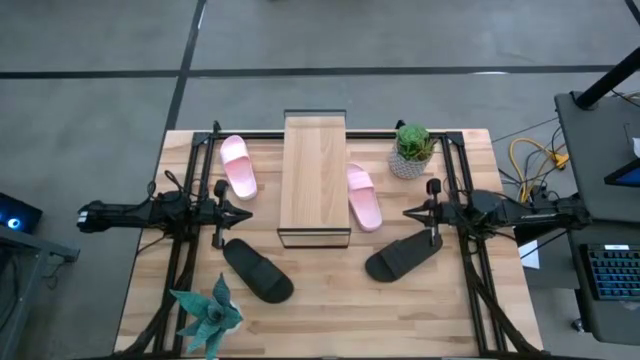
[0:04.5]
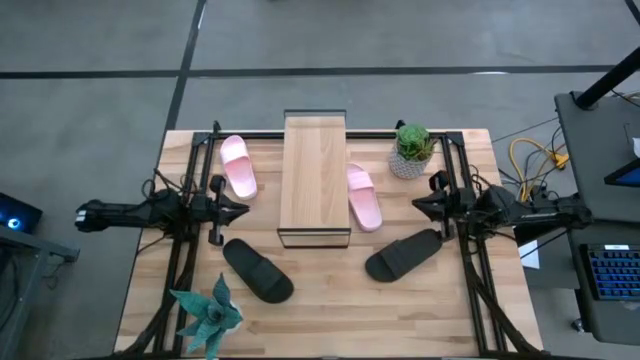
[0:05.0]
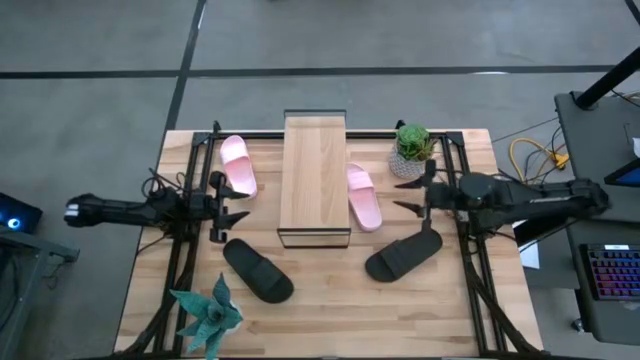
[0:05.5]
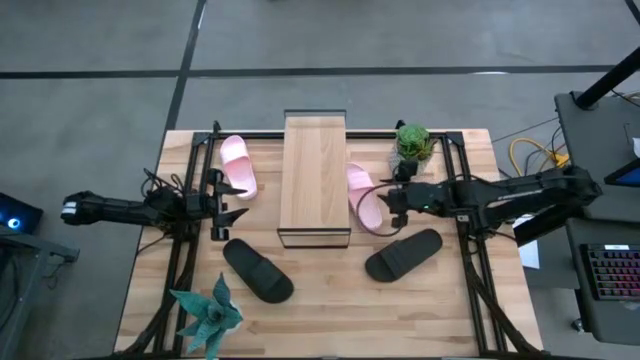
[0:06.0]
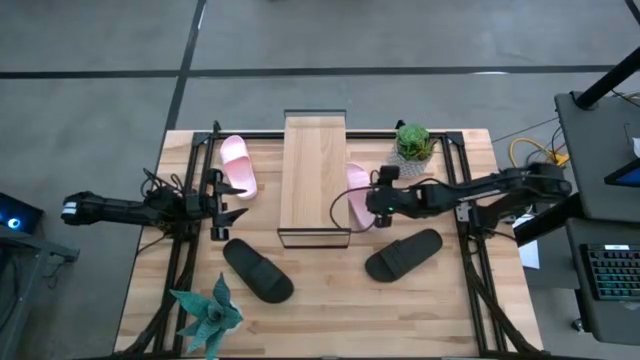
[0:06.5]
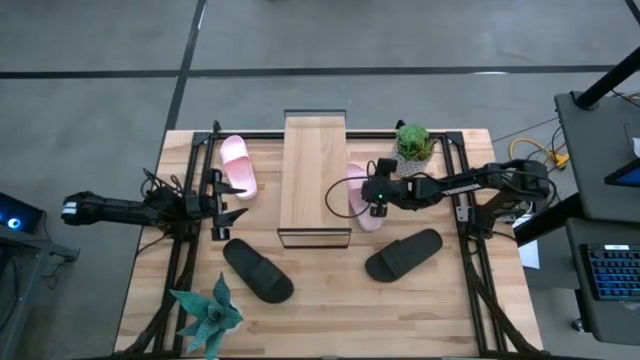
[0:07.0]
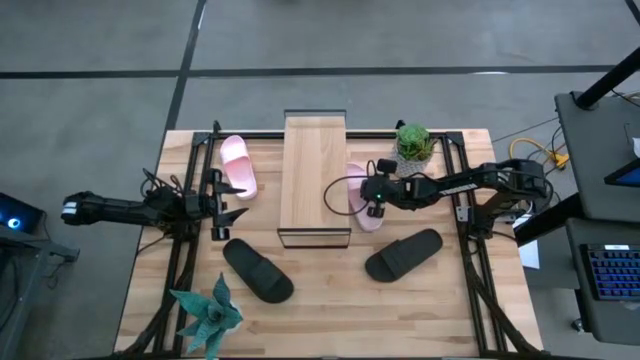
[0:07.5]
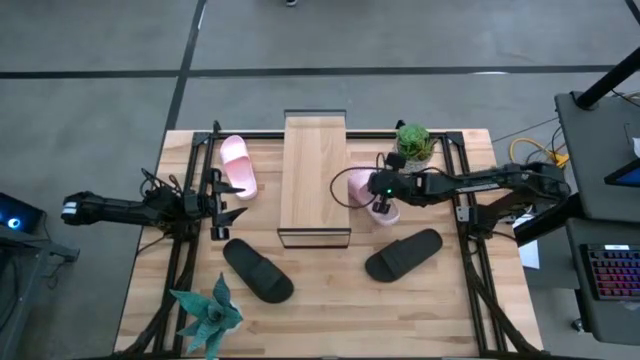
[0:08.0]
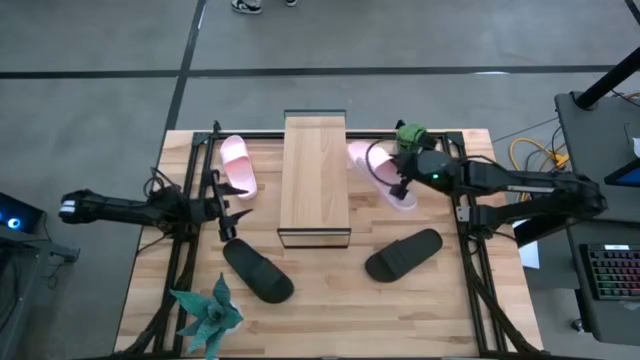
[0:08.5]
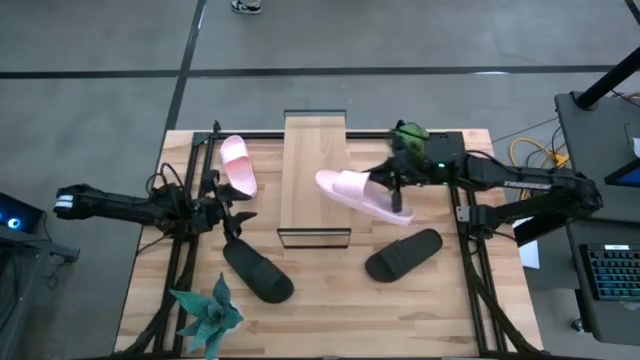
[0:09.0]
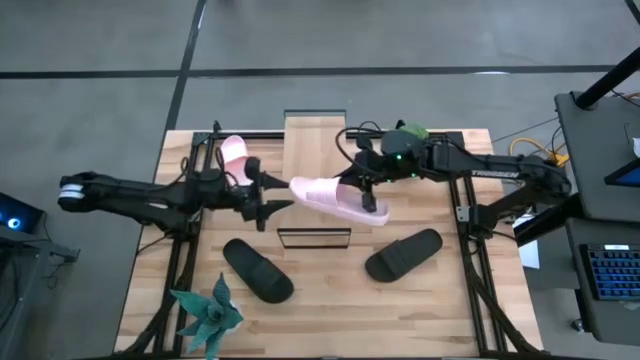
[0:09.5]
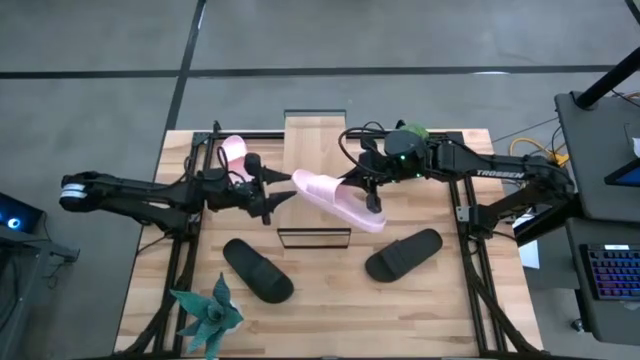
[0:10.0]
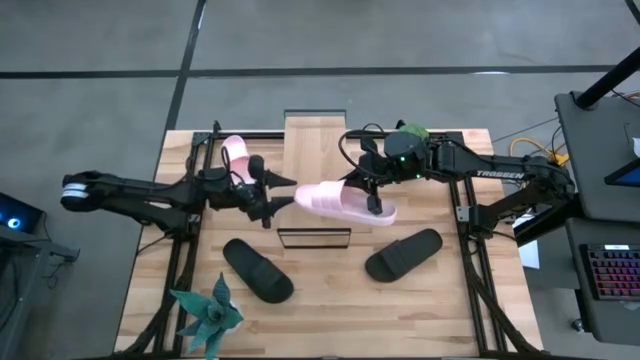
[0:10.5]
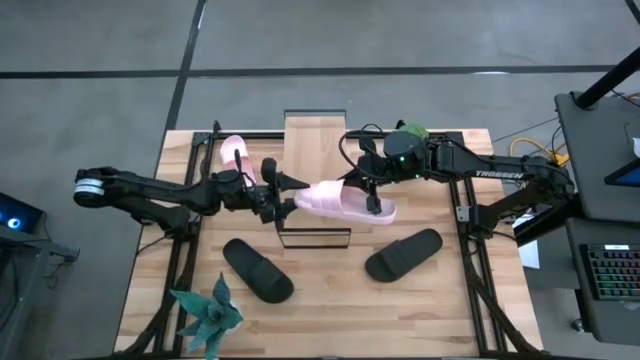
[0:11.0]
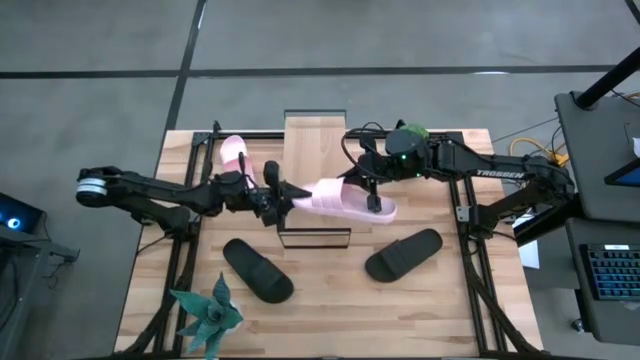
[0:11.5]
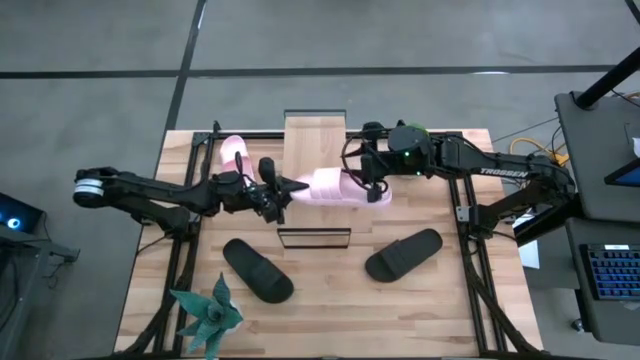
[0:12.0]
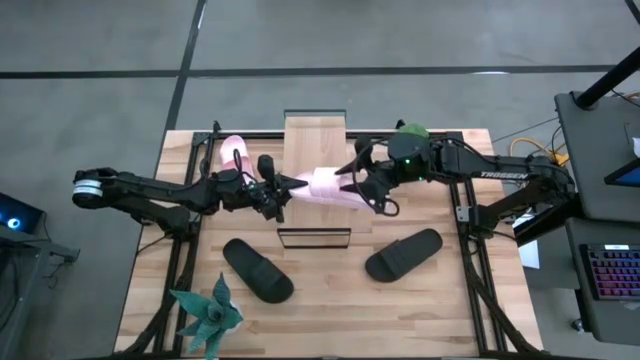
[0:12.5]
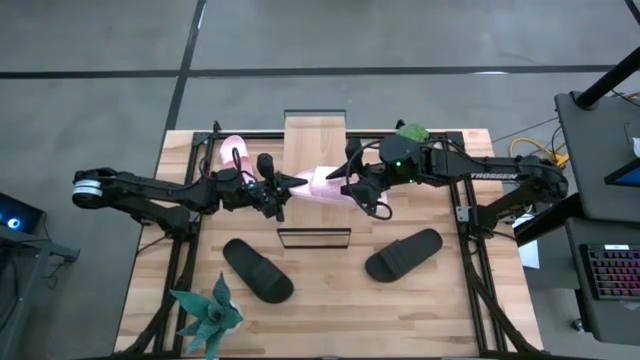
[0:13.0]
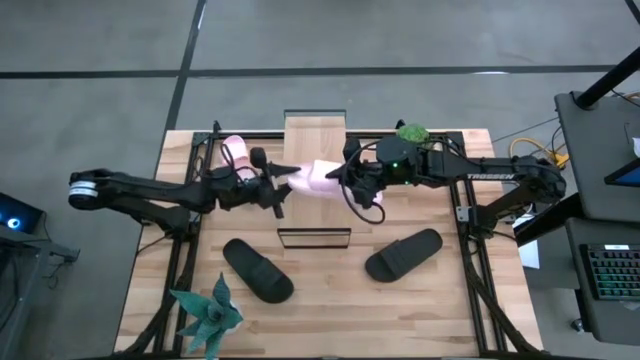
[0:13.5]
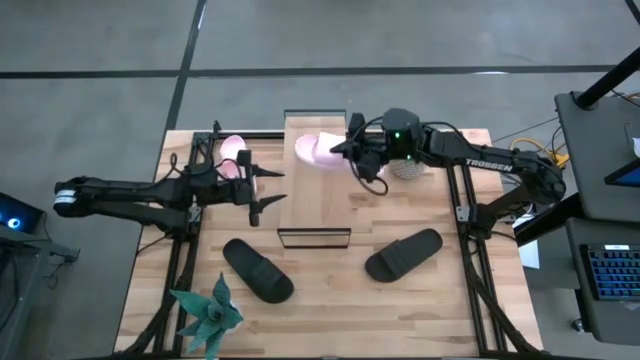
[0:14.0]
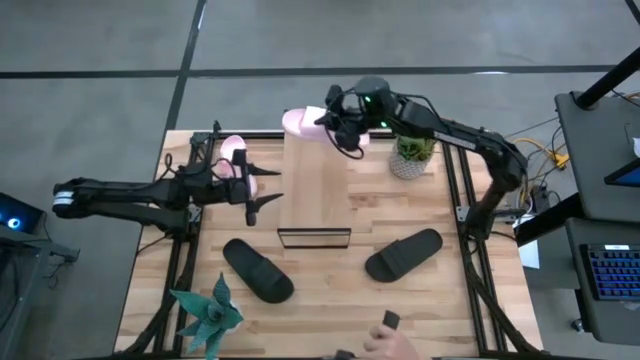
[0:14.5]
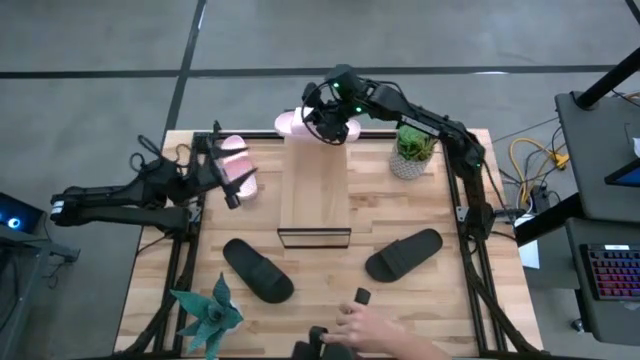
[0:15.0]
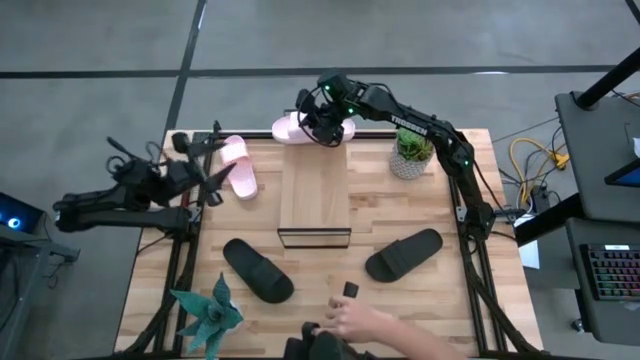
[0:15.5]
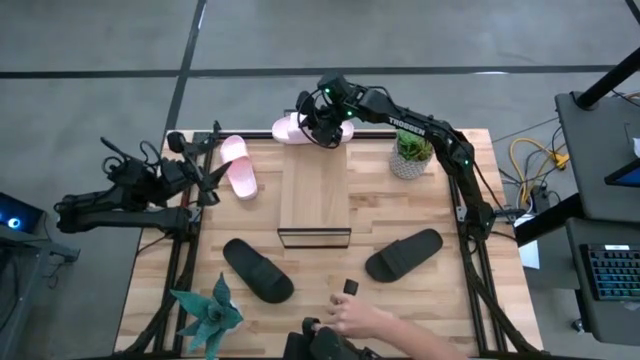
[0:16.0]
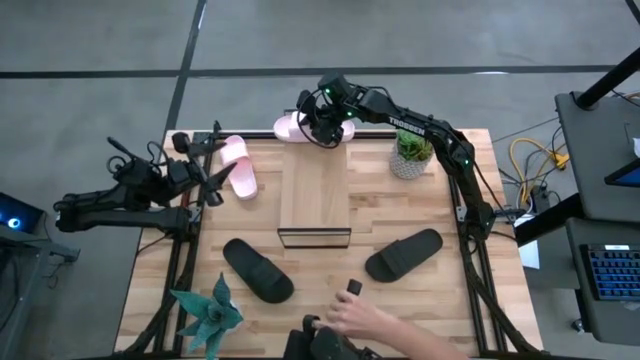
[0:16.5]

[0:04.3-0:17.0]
Task: Pick and place slides into the shelf
Put the right pink slide on the shelf

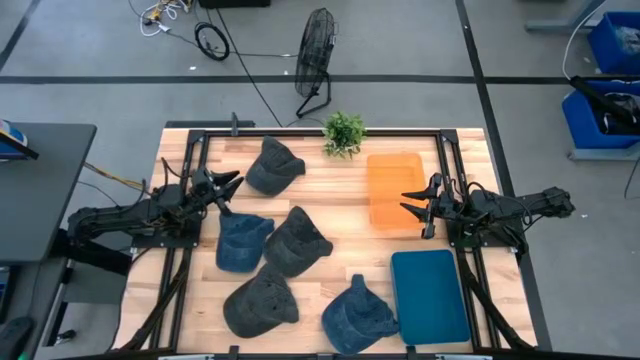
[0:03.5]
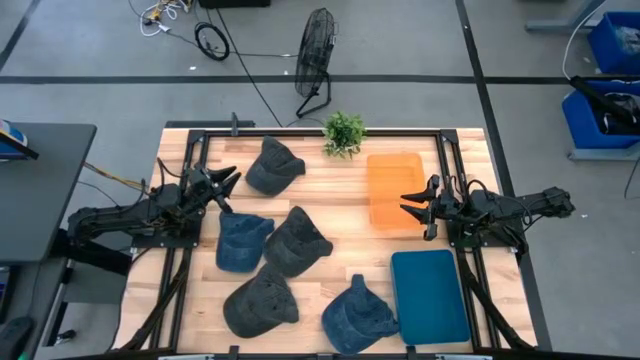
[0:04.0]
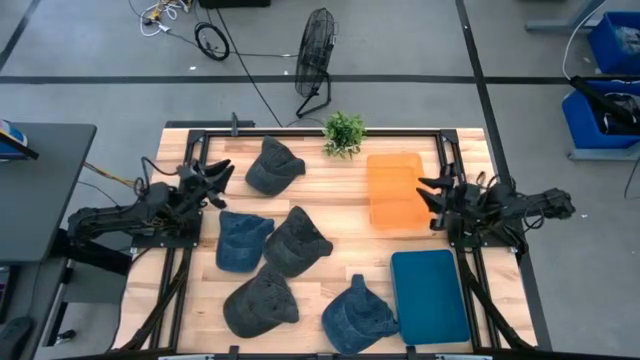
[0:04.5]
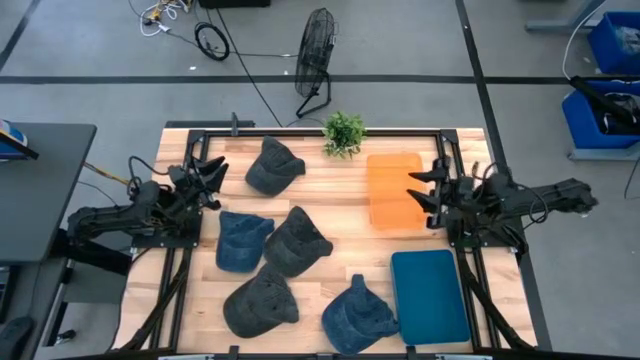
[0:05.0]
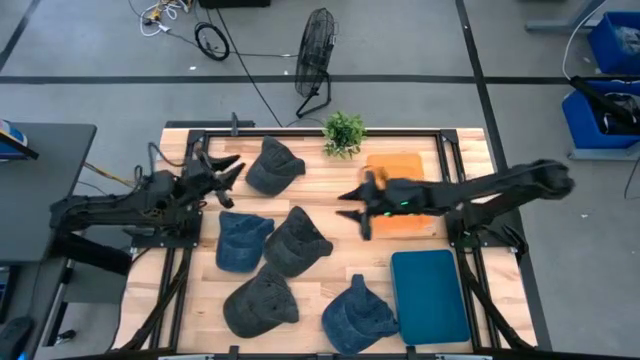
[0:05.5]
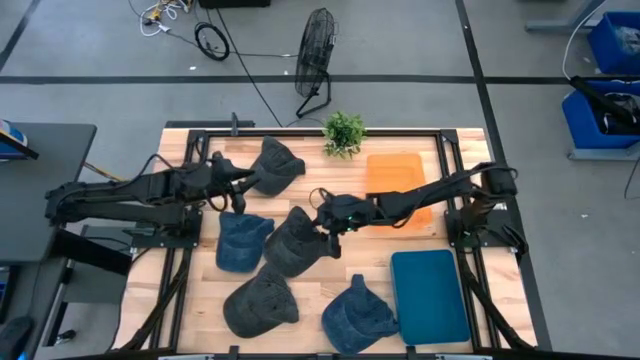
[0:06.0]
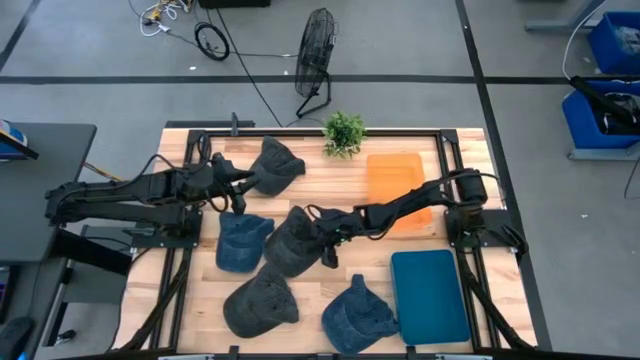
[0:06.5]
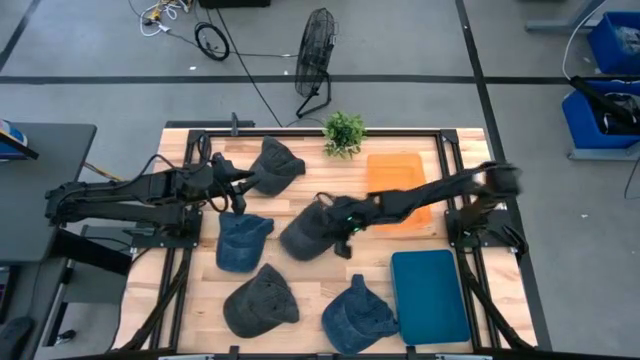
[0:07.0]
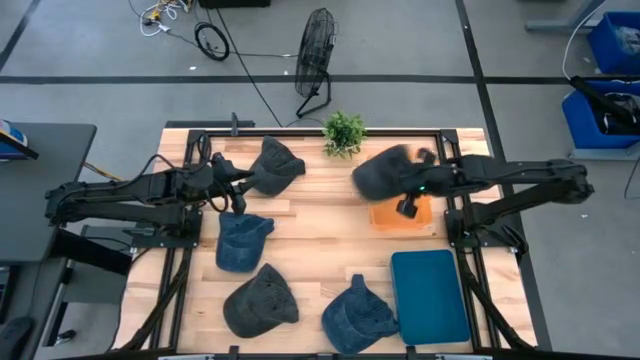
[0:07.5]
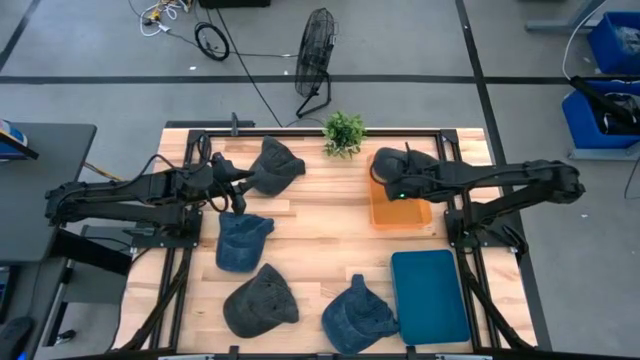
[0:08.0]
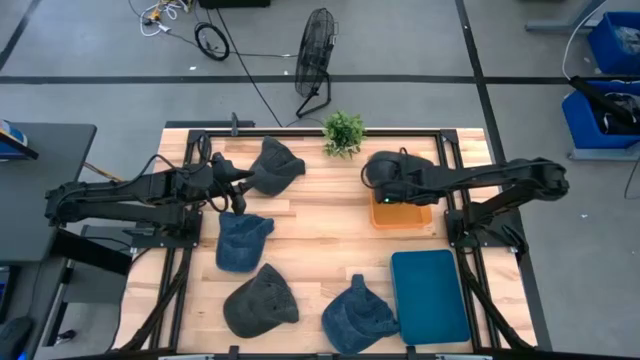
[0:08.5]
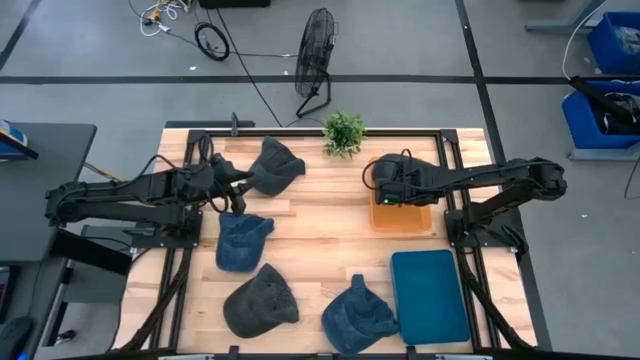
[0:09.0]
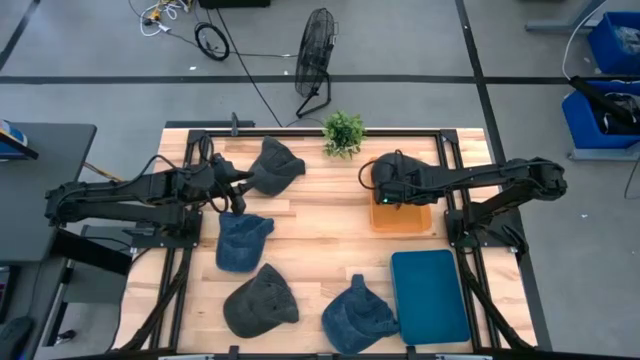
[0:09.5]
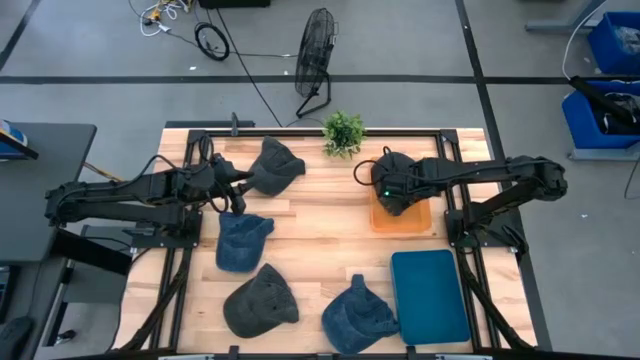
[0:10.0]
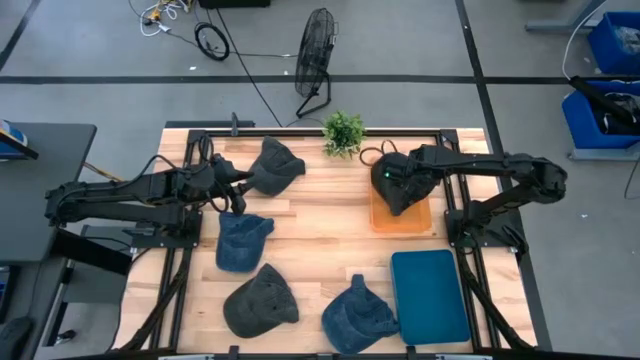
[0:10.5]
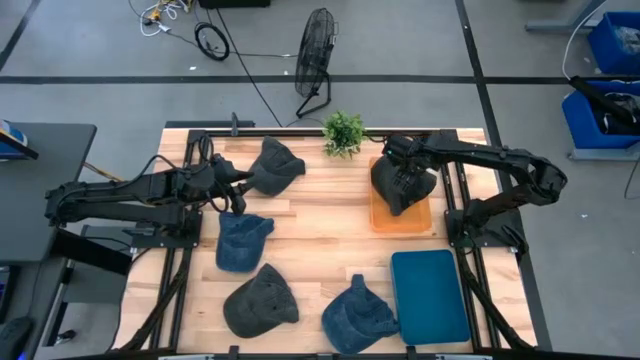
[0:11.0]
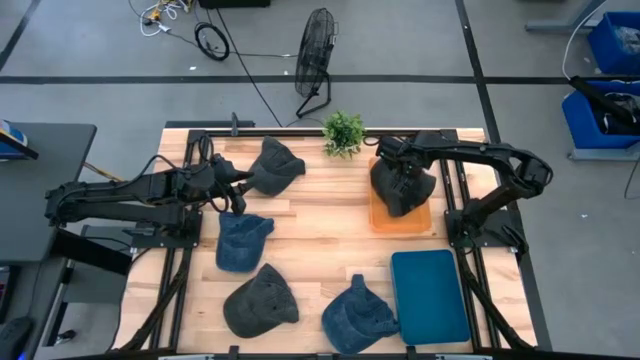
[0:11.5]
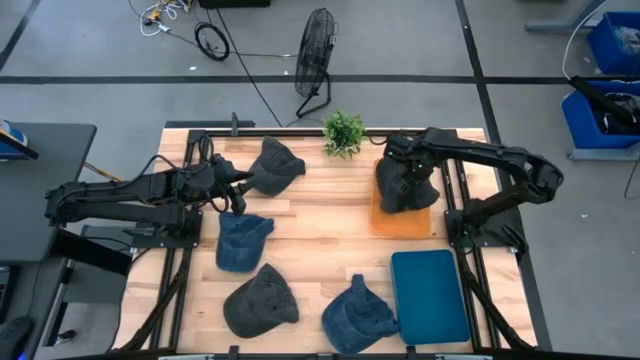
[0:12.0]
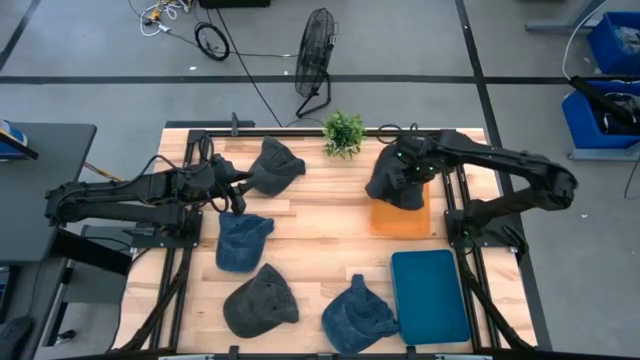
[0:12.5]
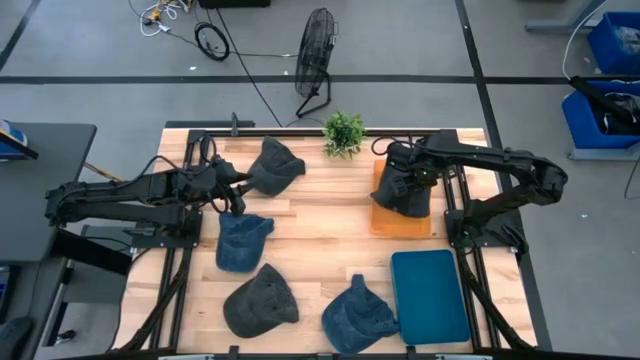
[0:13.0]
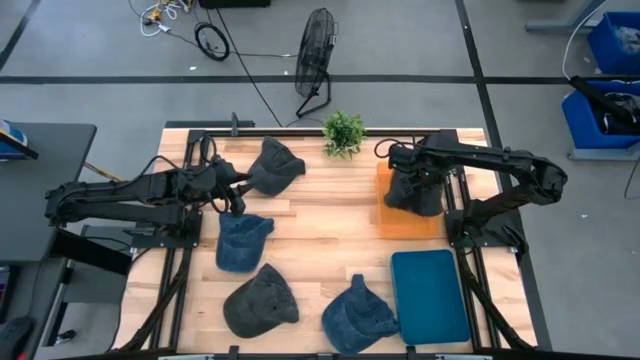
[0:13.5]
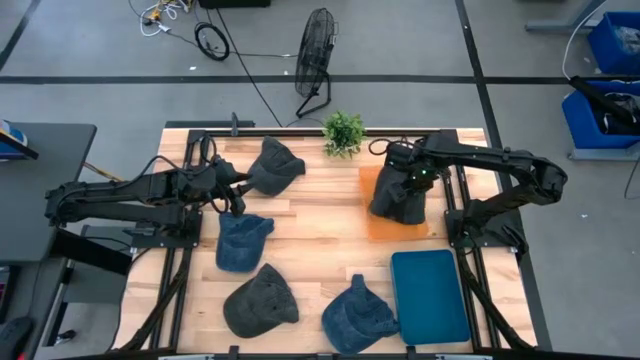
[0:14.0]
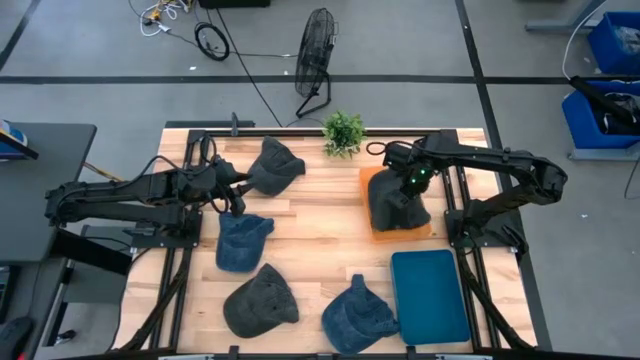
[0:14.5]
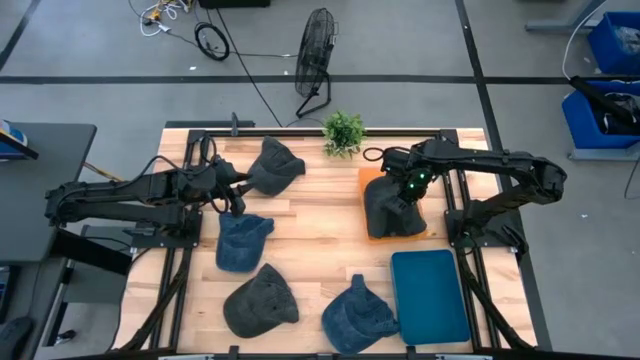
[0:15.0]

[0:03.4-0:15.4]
Task: Pick & Place hat
Put the middle black cap into the orange bin
